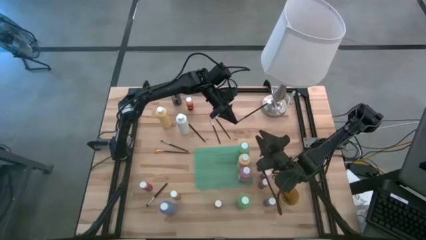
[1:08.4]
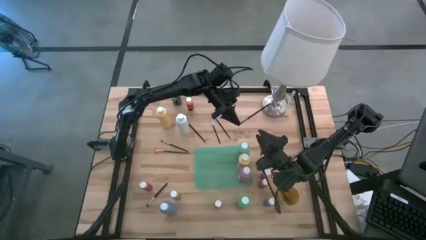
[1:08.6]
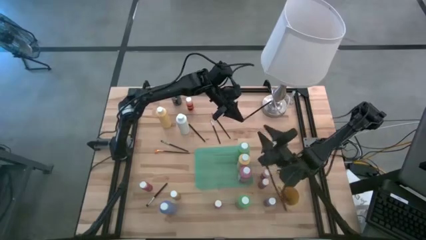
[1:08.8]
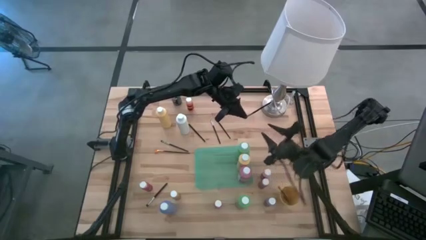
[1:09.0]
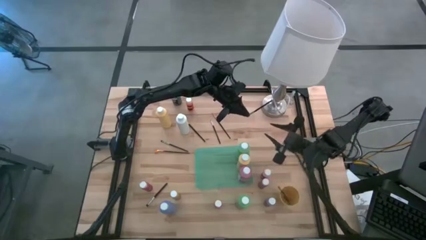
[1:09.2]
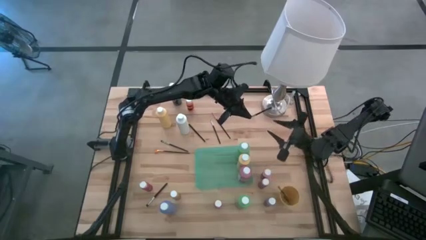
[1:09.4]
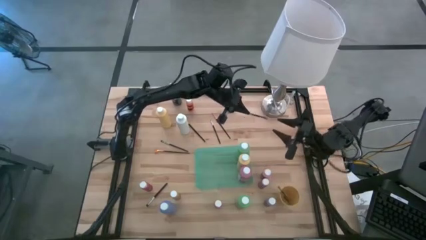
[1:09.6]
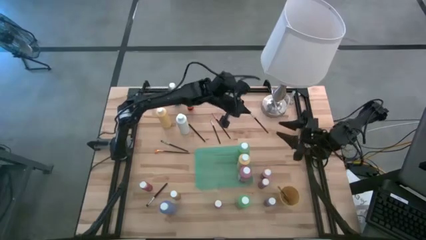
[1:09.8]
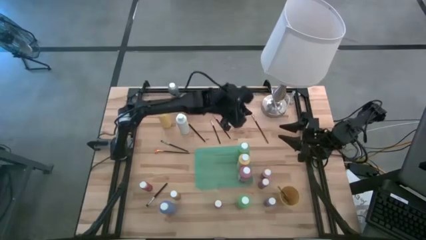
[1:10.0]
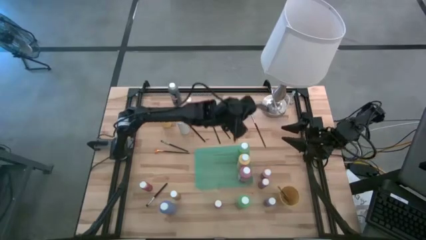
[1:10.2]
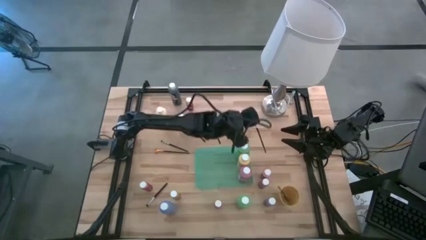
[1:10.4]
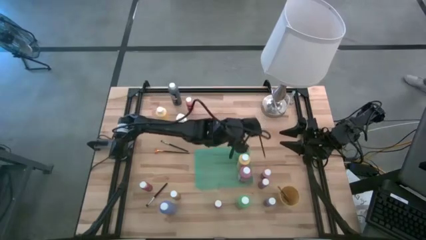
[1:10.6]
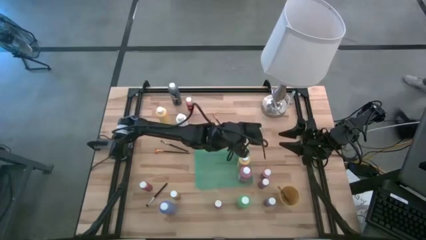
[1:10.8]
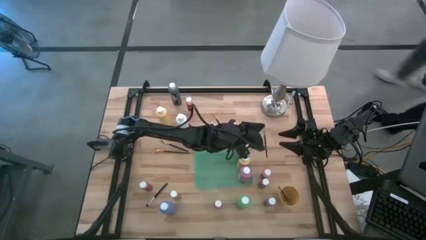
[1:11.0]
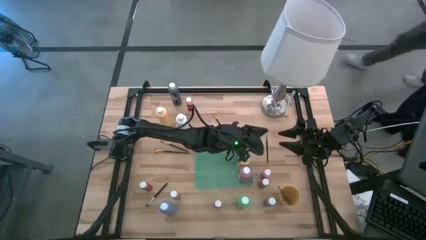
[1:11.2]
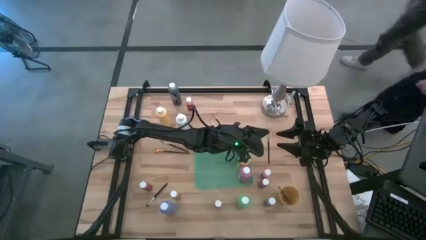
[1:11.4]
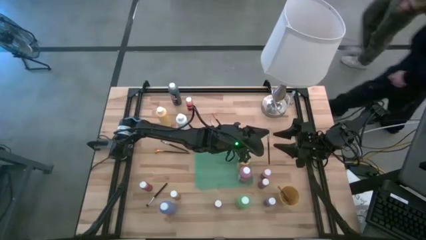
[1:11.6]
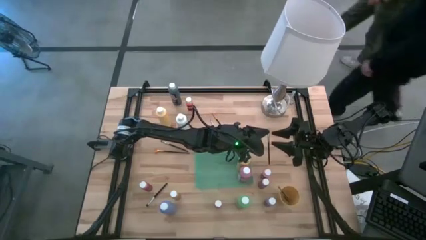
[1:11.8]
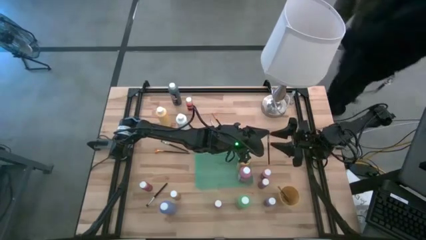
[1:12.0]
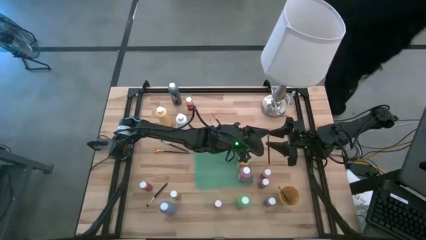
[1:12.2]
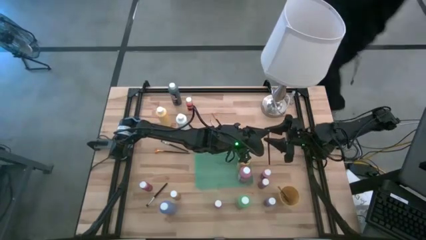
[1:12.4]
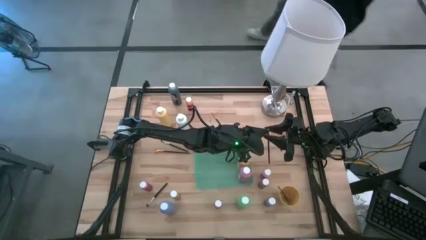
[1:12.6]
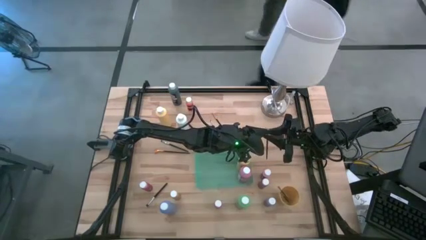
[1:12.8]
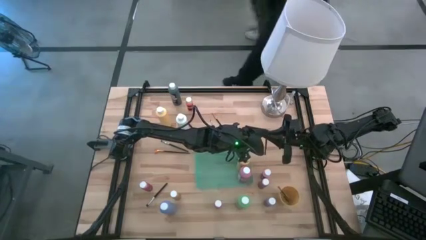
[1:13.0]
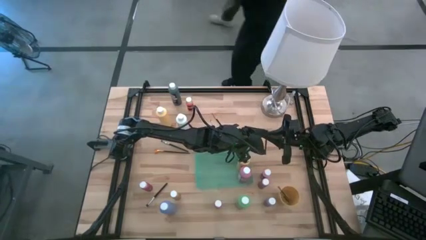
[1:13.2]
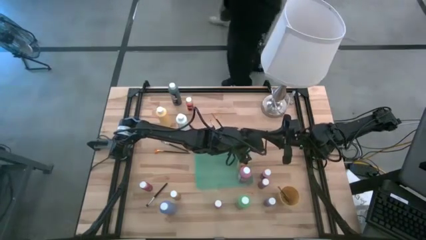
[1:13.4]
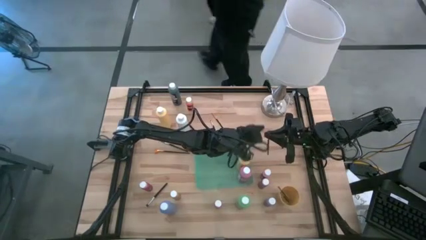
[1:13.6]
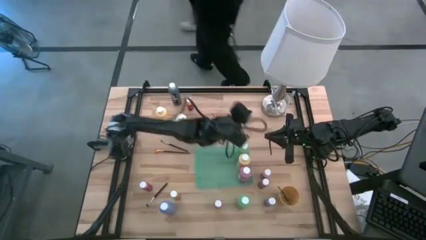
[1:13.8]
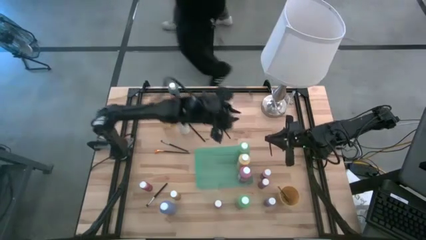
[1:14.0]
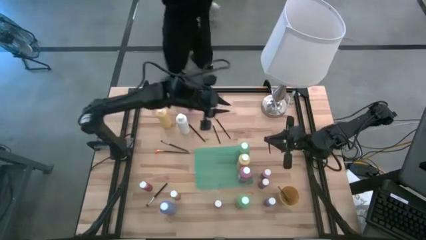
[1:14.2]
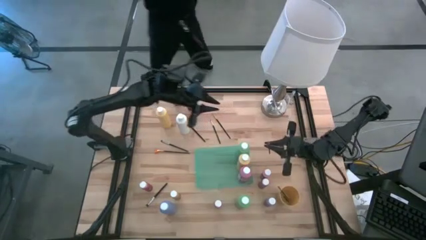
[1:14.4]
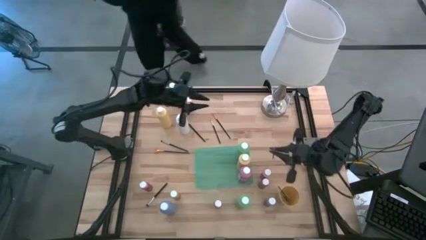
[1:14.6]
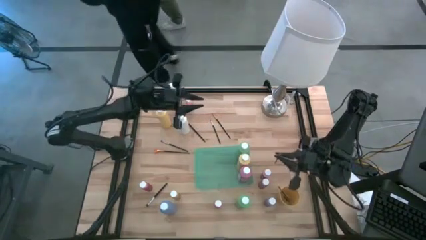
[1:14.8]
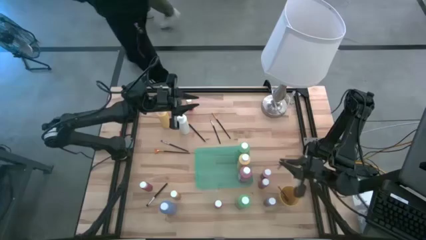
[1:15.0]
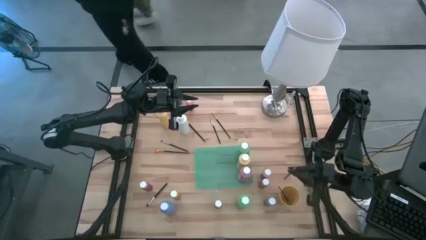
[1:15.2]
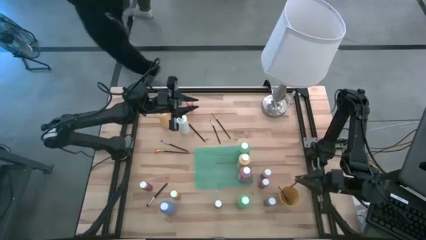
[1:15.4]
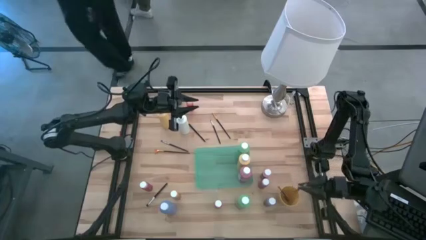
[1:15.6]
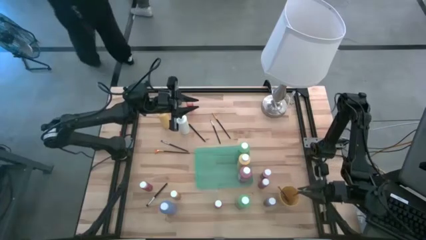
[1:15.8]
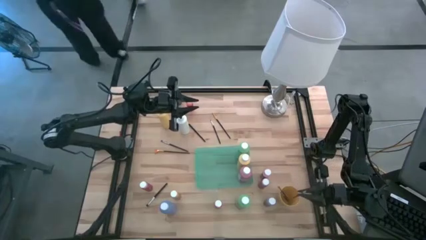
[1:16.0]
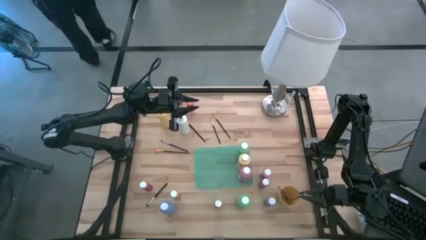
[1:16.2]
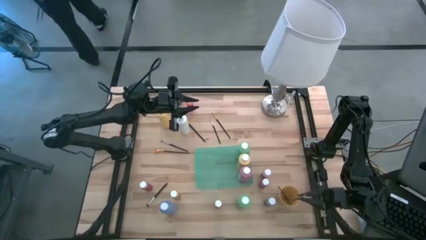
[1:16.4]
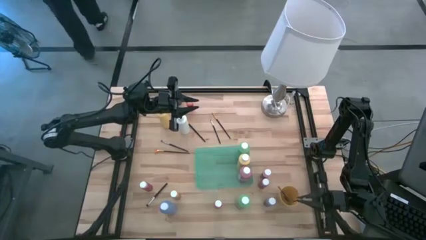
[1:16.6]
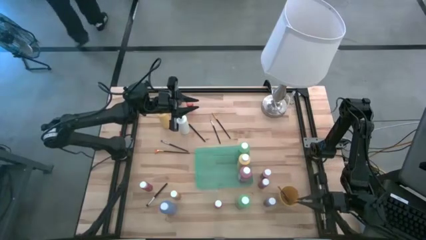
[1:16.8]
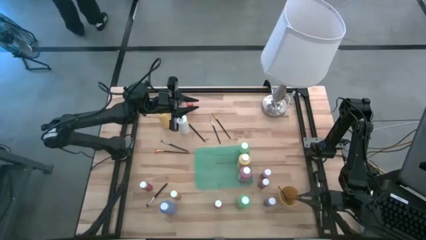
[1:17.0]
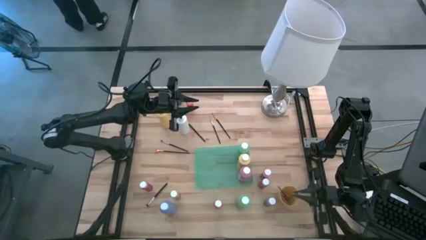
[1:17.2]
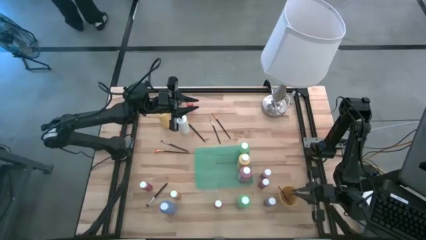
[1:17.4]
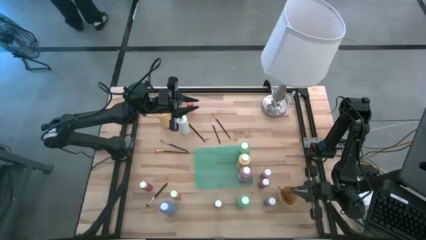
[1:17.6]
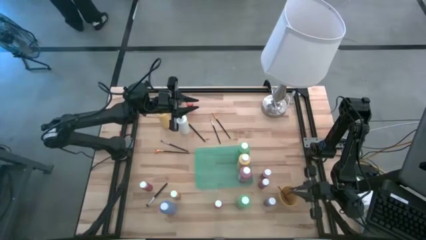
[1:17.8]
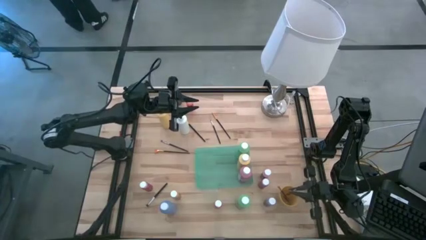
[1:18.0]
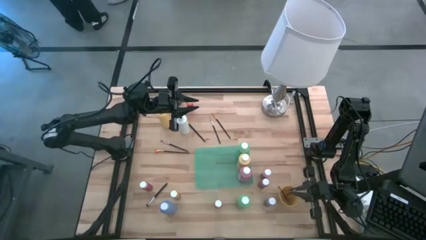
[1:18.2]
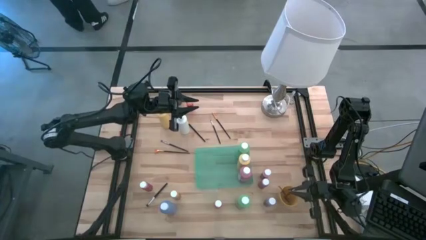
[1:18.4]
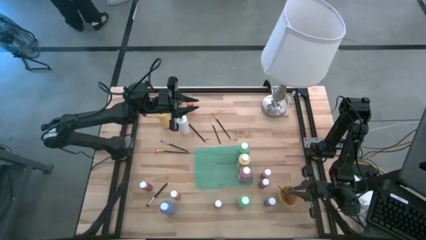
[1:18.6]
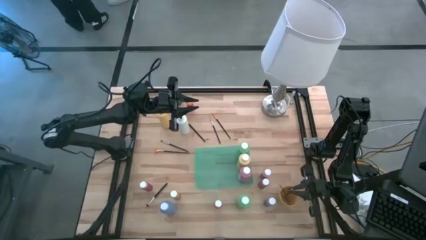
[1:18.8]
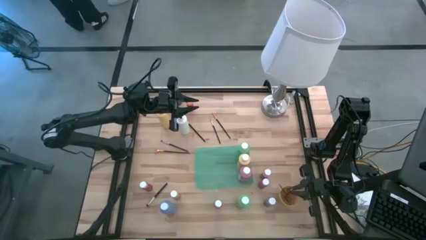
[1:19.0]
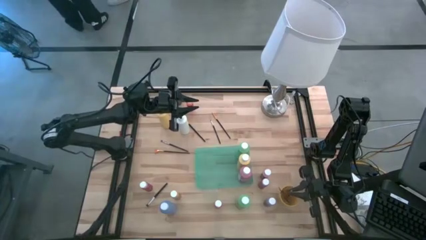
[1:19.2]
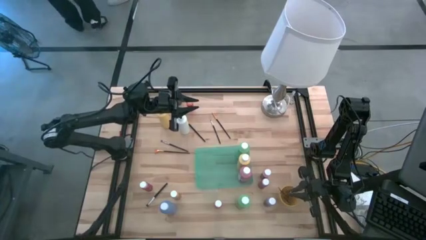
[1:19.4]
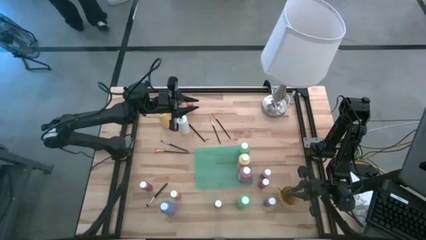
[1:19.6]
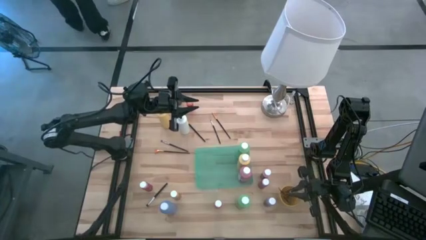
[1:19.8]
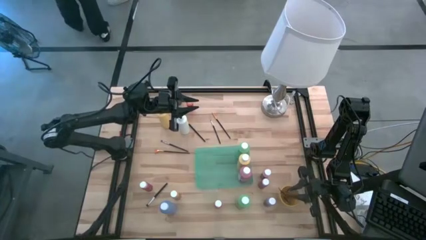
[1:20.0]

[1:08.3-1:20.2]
Task: Pick & Place Paint Supplies
Put the silver paintbrush into the yellow cup
